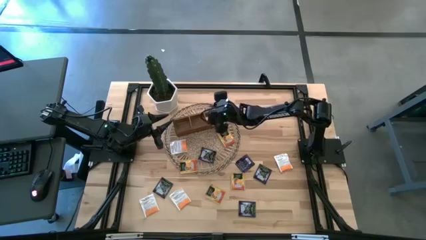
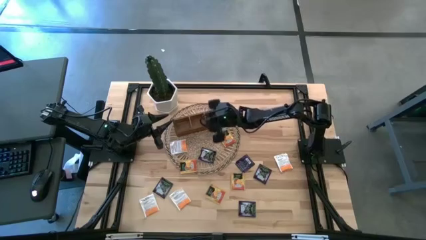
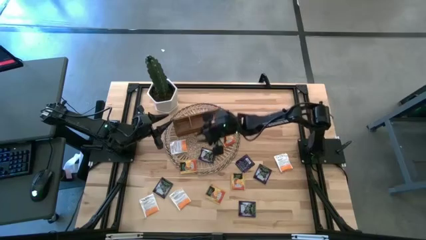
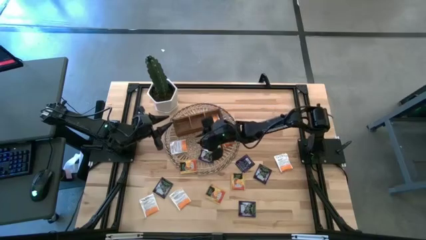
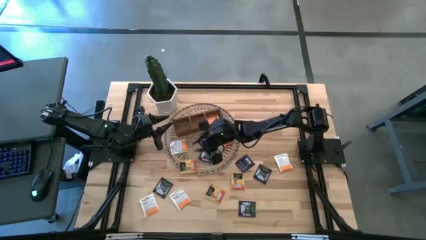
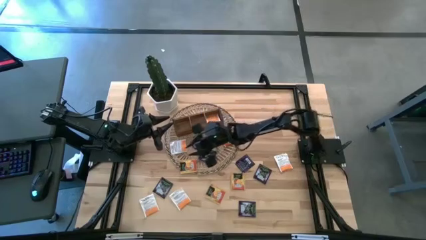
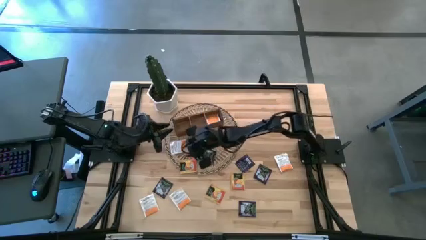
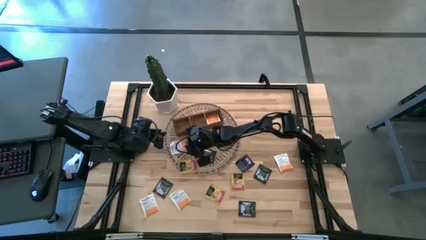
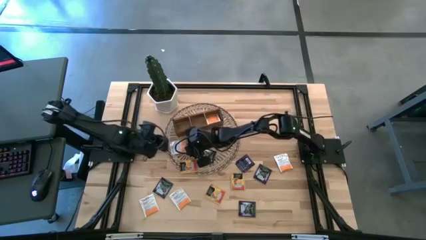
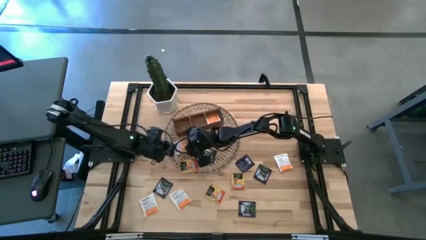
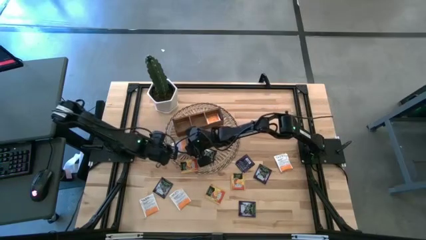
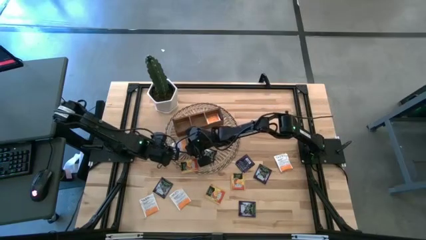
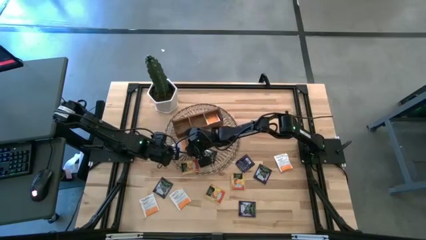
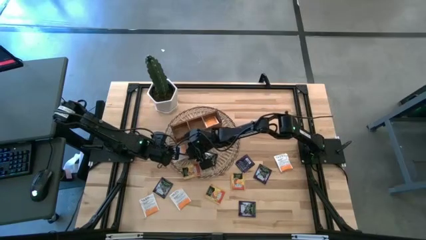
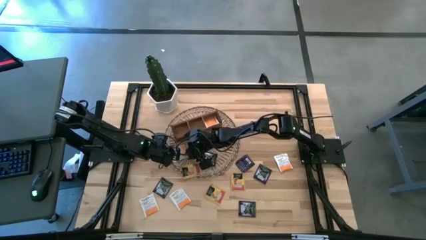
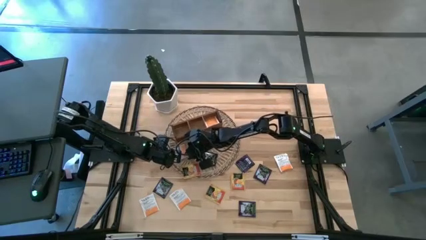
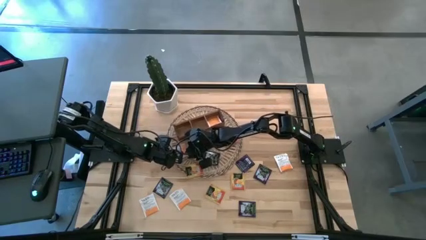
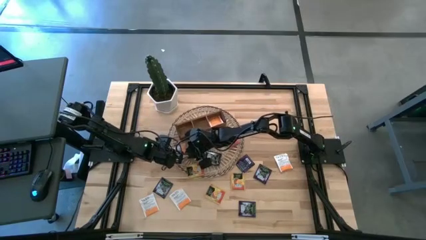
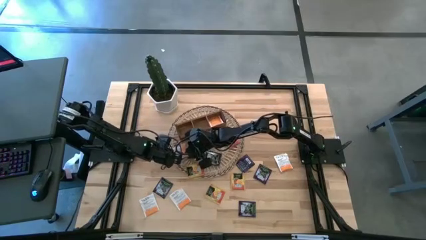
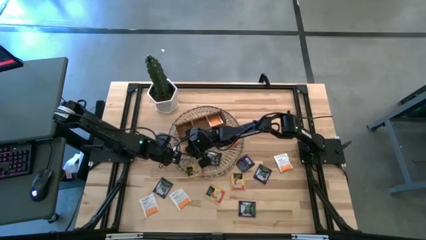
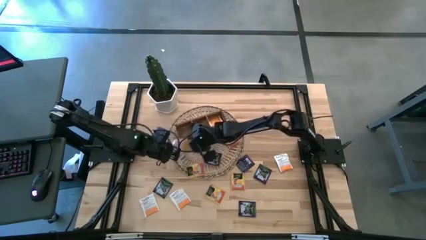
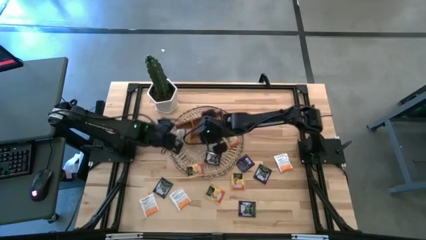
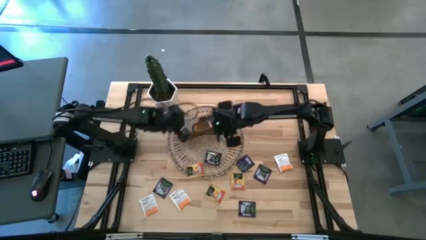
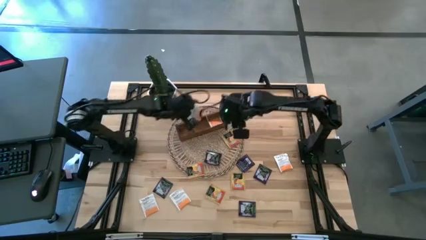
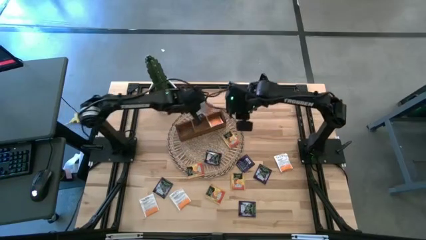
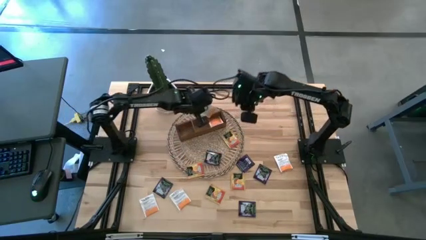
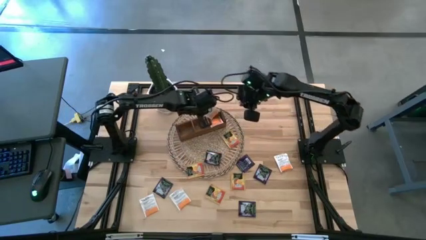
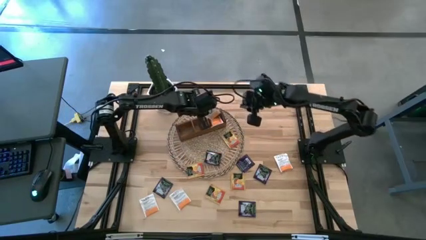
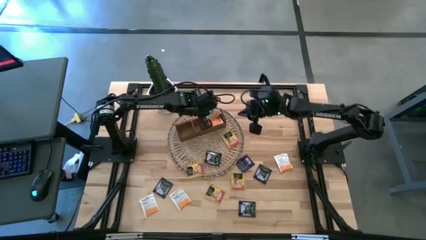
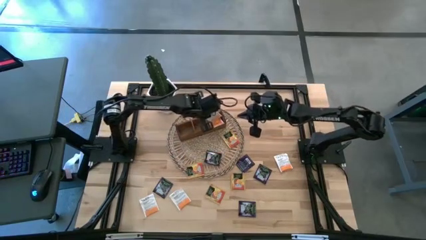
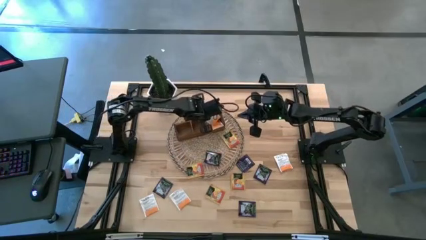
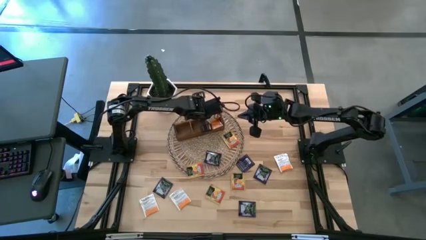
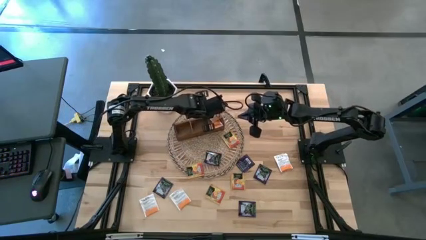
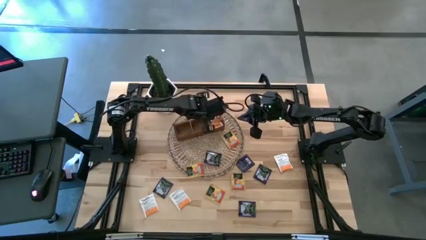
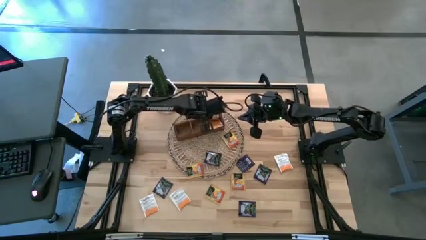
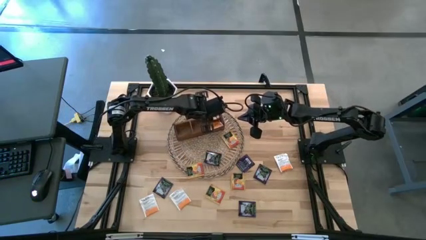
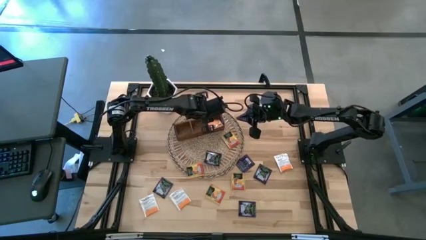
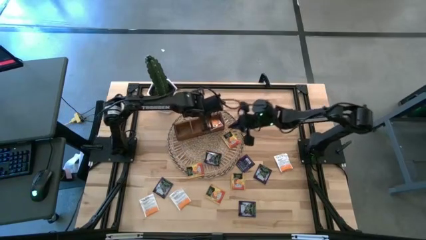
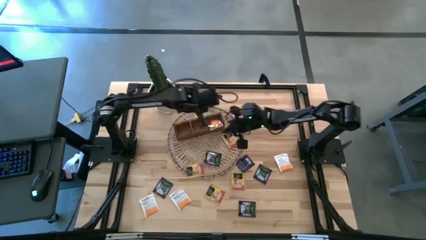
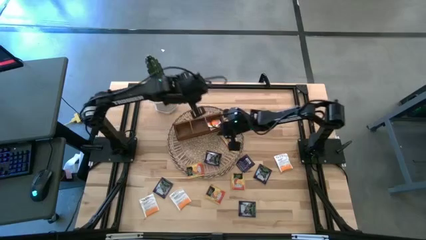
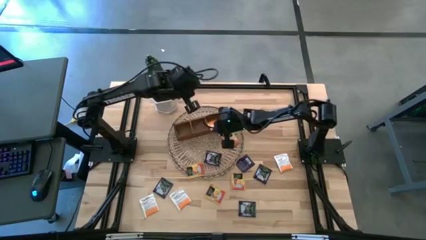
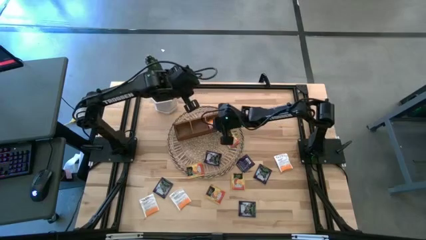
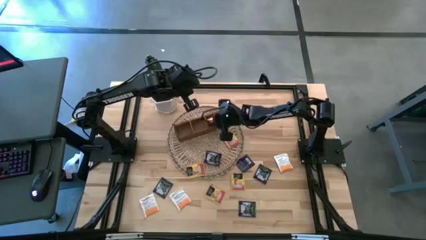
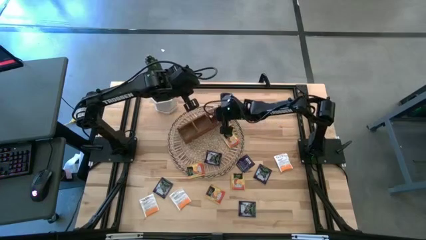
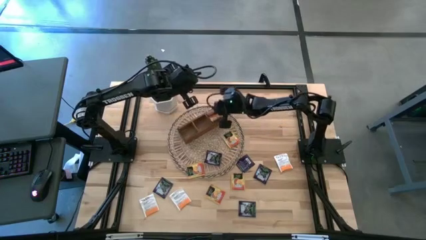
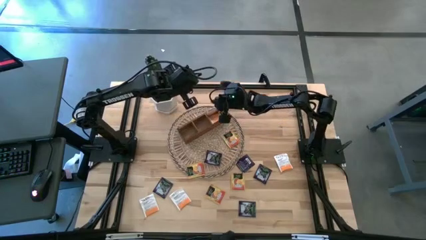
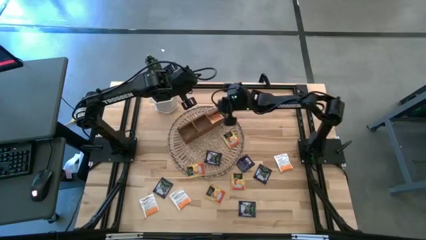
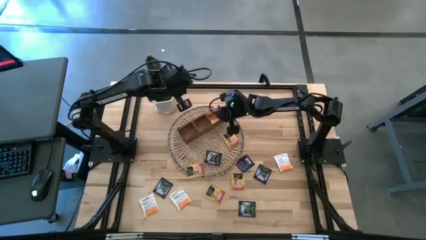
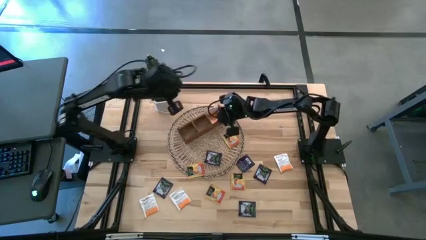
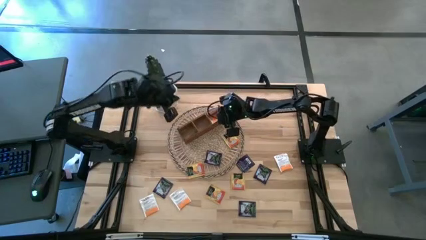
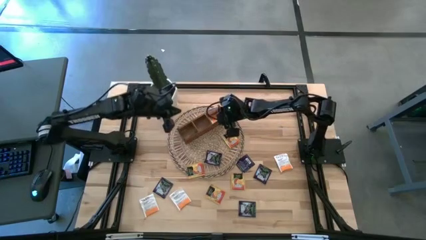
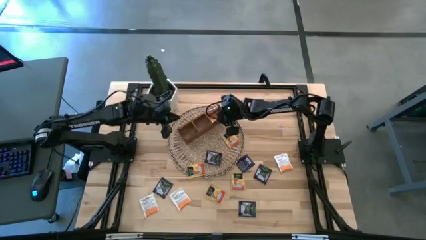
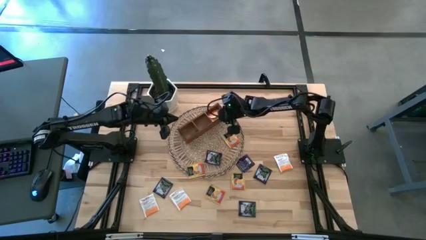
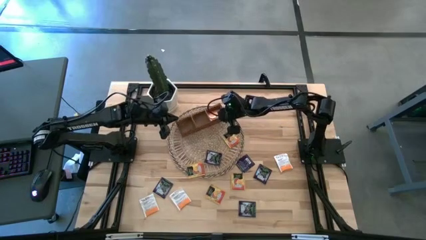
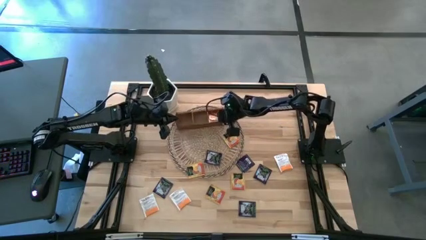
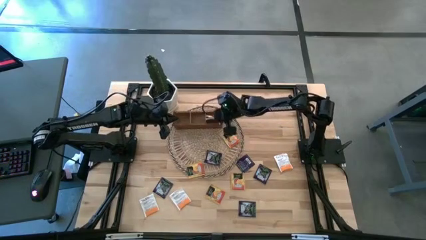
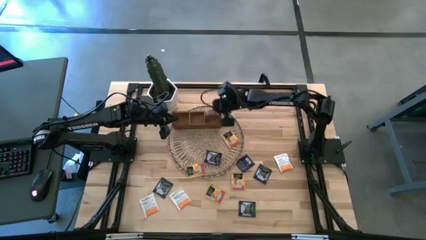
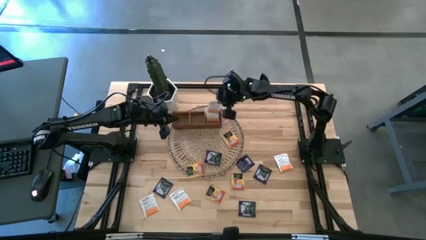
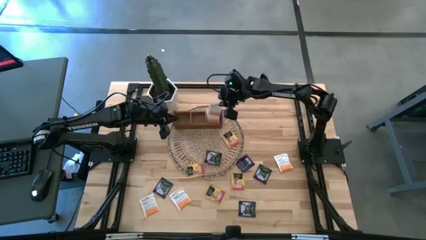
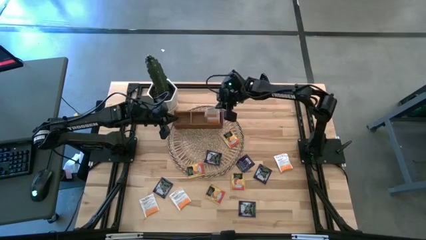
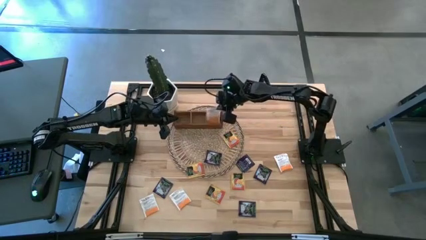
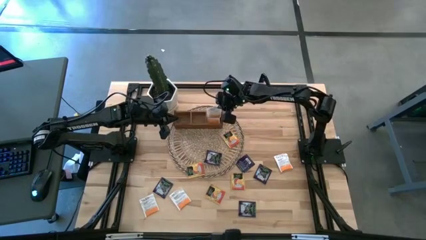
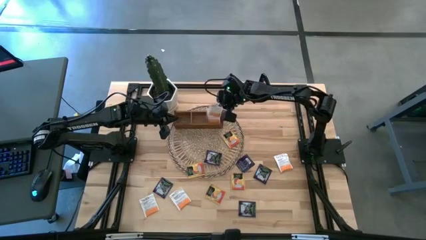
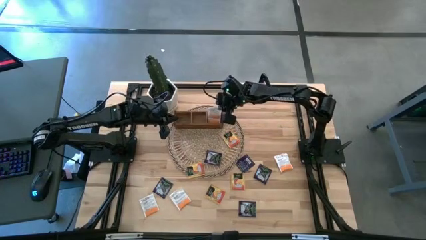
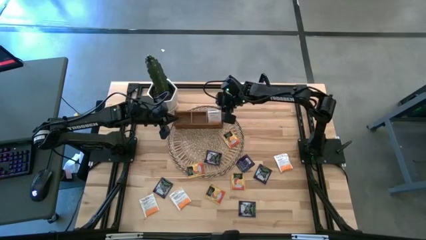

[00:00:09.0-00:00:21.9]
Task: Pick & Place Tea
Put the white tea bag into the right section of the wooden organizer

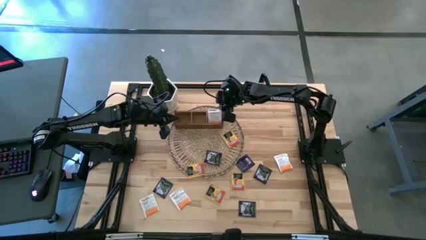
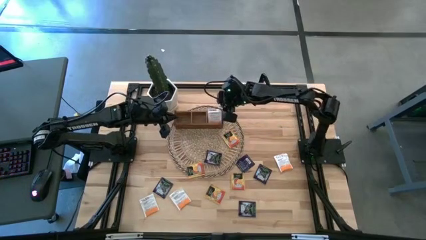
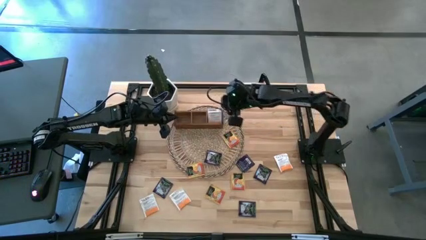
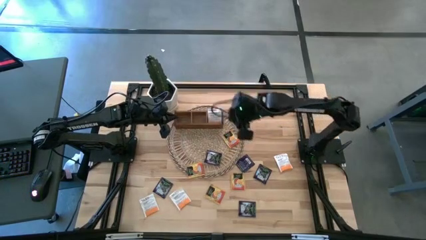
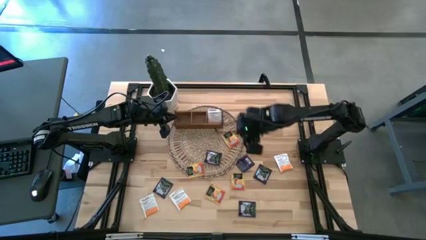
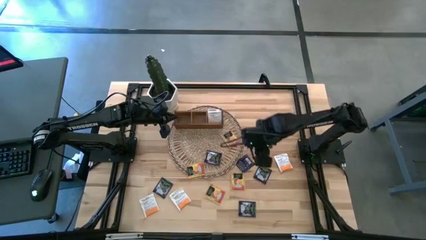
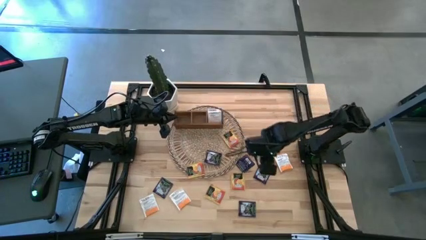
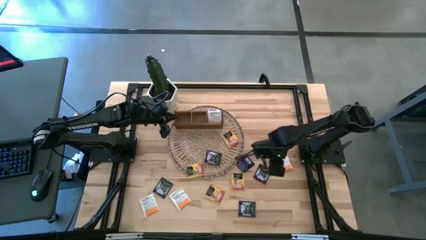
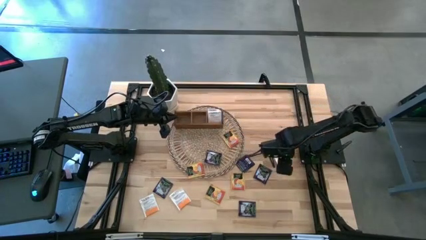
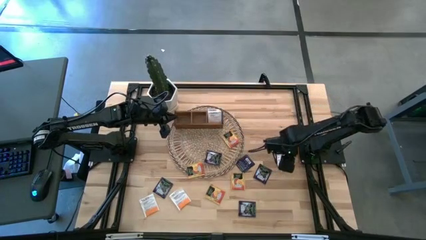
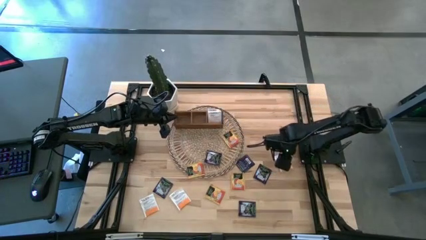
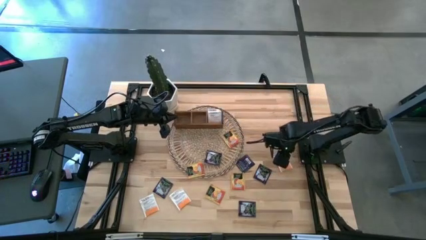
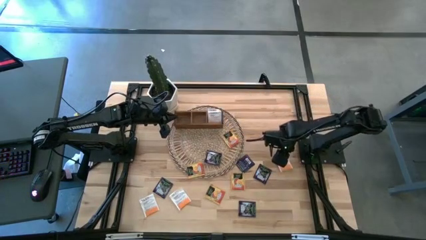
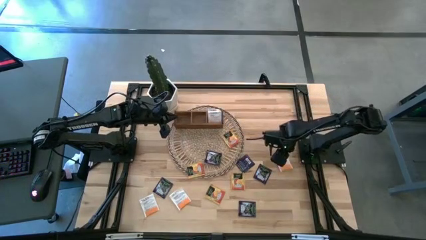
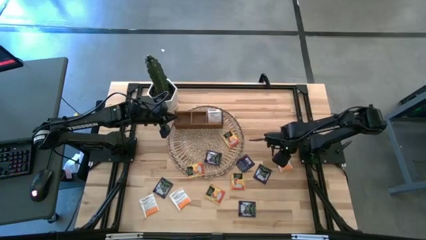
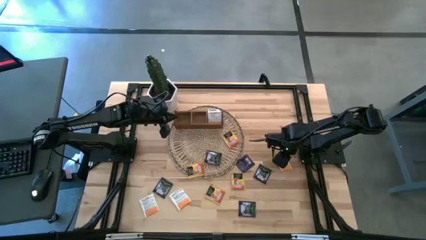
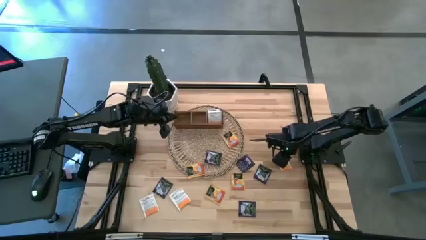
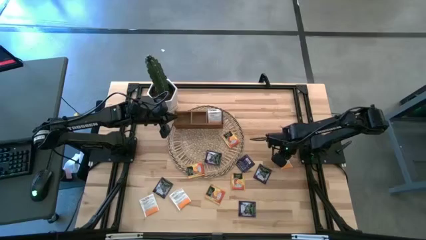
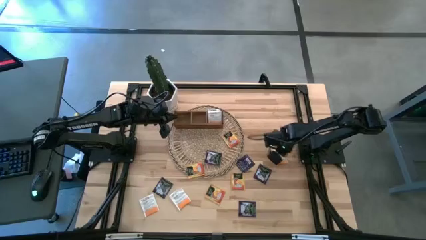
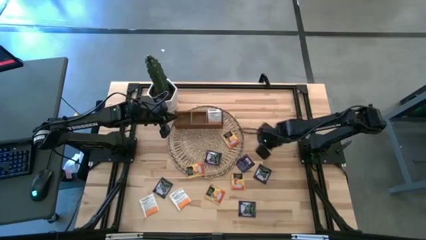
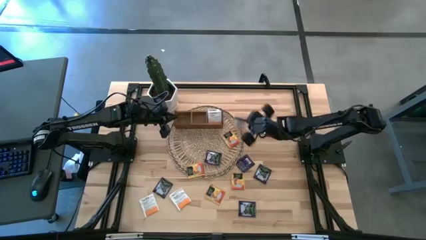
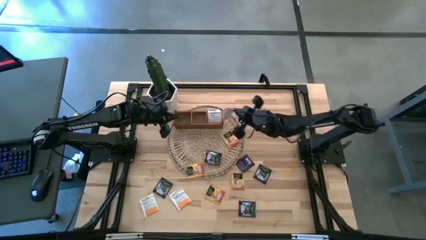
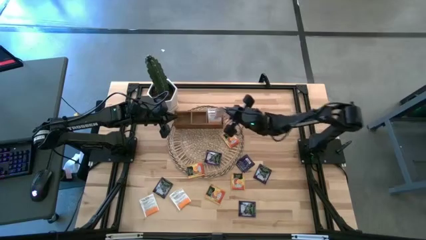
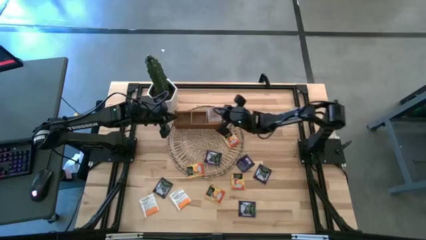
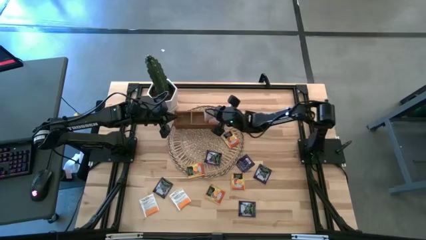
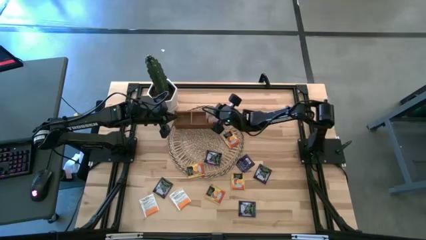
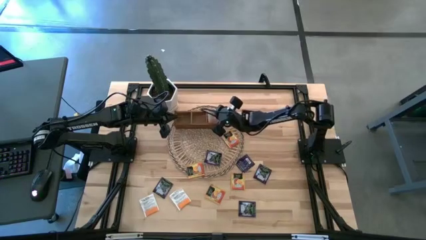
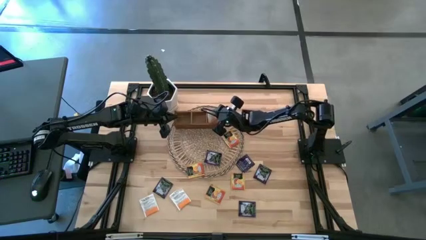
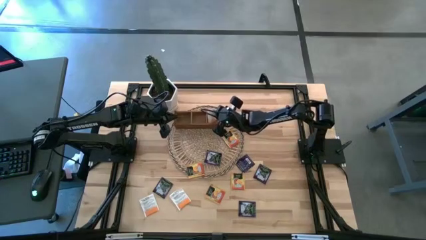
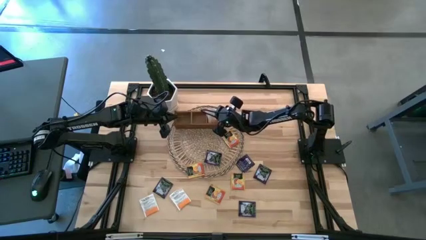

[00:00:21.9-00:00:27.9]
Put the white tea bag into the right section of the wooden organizer
